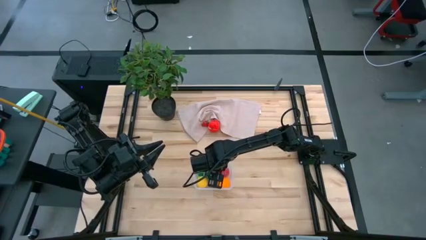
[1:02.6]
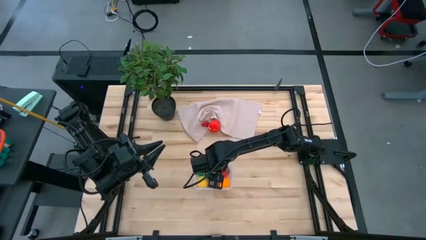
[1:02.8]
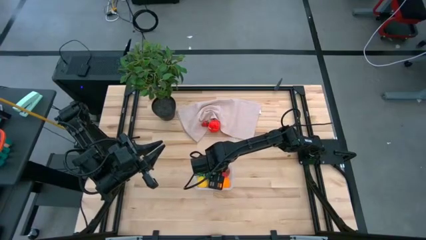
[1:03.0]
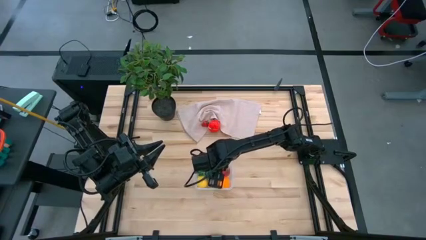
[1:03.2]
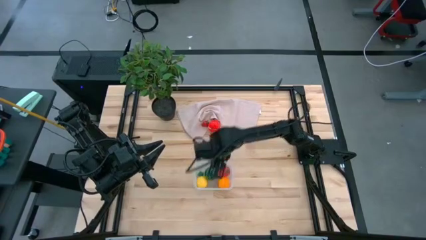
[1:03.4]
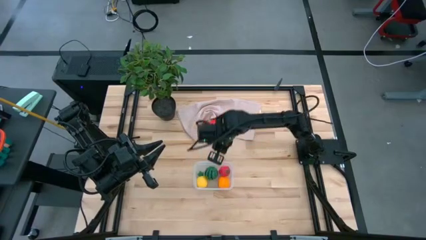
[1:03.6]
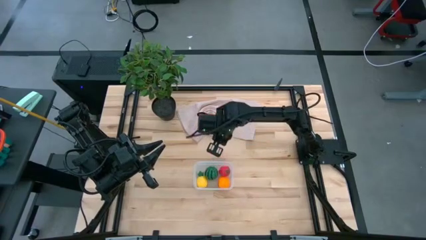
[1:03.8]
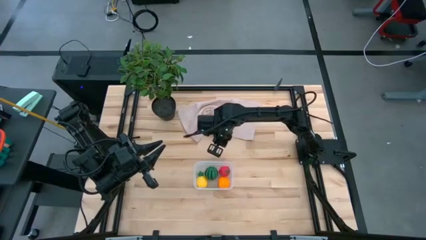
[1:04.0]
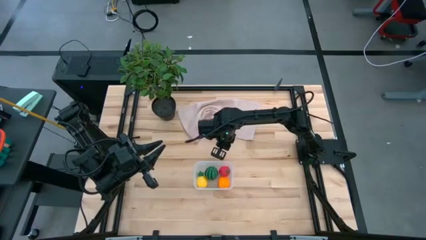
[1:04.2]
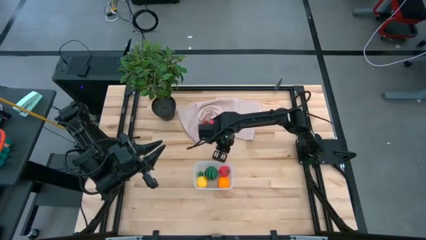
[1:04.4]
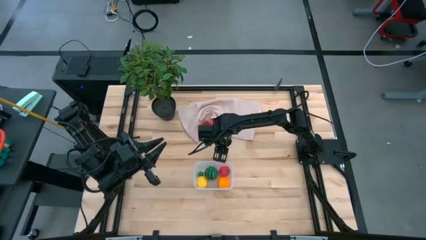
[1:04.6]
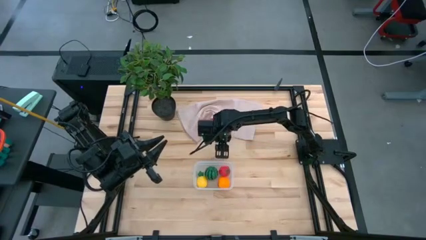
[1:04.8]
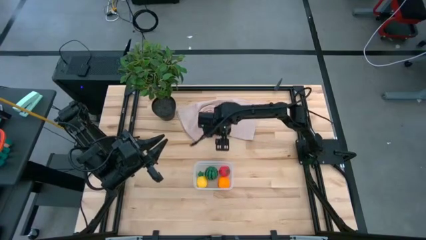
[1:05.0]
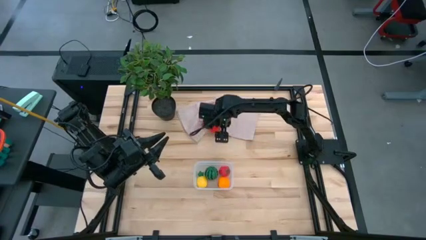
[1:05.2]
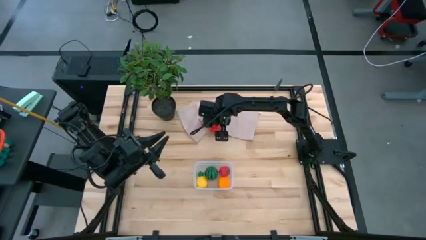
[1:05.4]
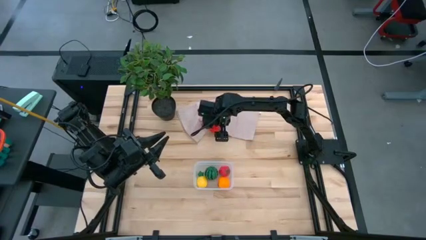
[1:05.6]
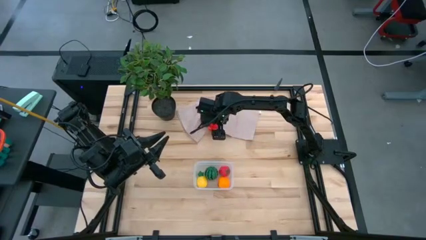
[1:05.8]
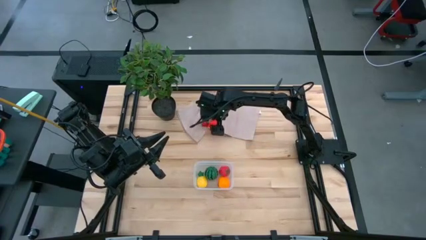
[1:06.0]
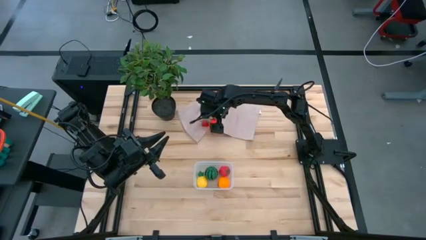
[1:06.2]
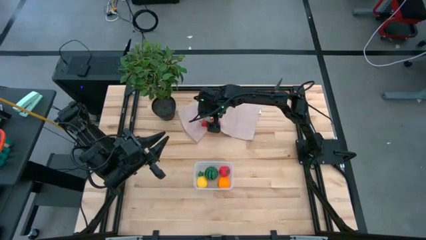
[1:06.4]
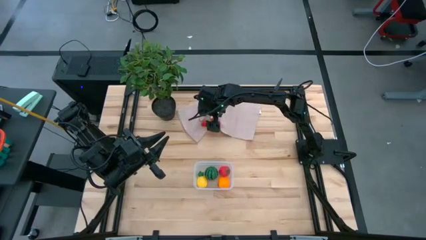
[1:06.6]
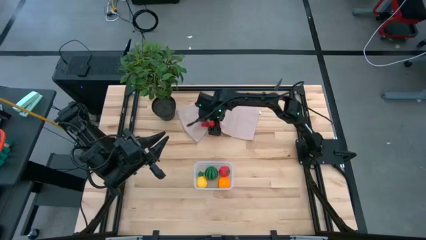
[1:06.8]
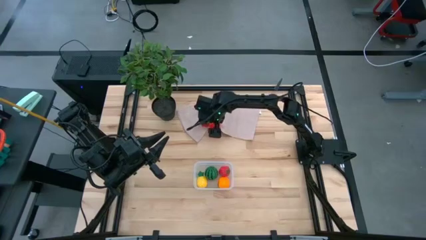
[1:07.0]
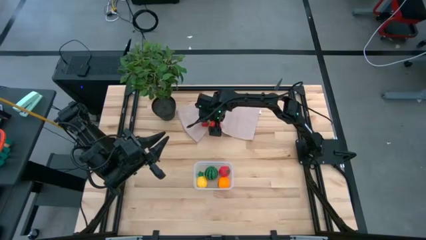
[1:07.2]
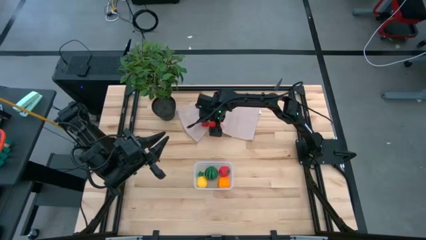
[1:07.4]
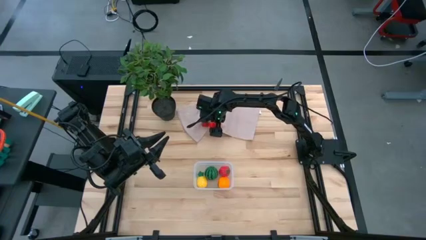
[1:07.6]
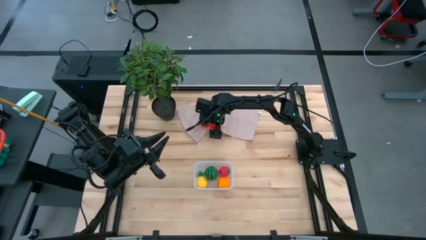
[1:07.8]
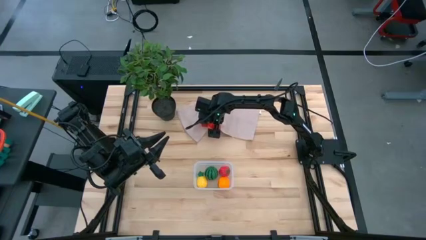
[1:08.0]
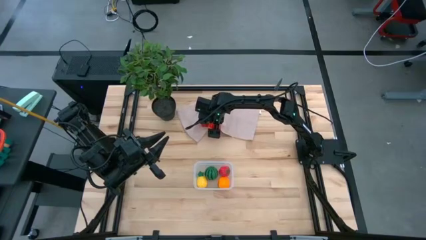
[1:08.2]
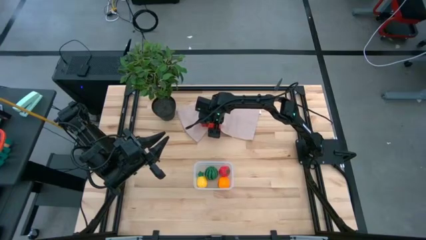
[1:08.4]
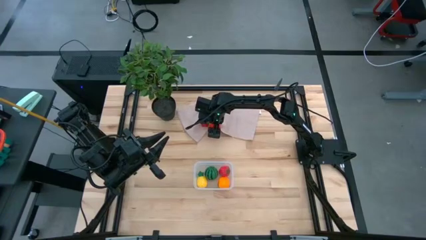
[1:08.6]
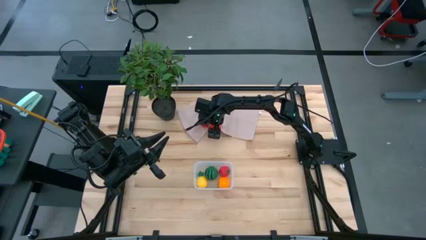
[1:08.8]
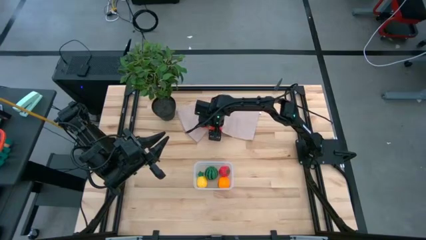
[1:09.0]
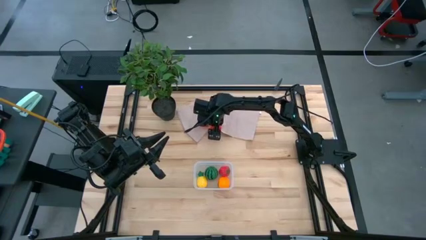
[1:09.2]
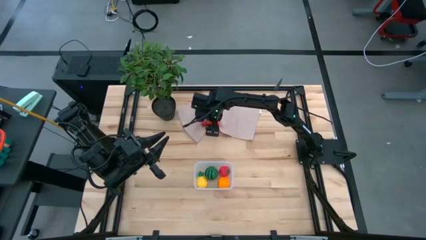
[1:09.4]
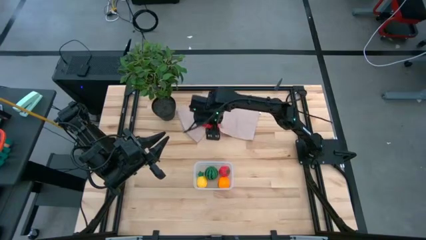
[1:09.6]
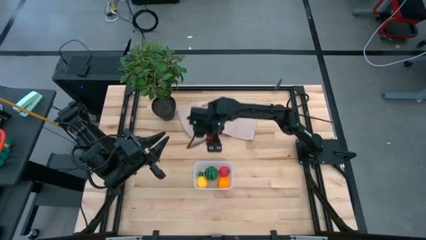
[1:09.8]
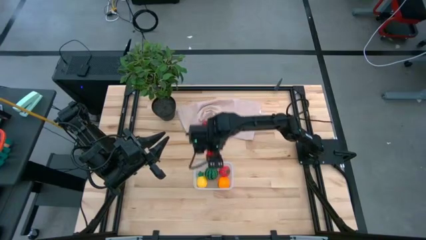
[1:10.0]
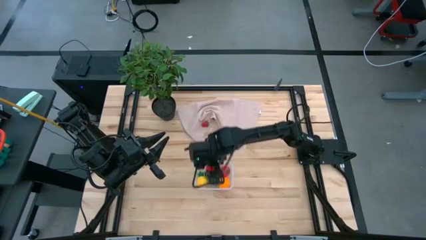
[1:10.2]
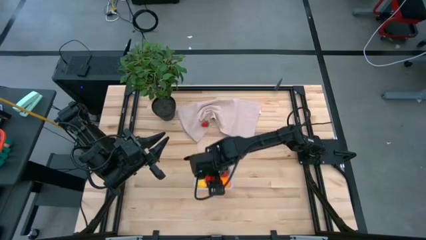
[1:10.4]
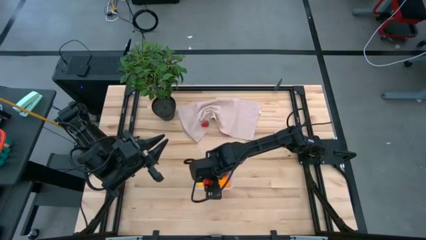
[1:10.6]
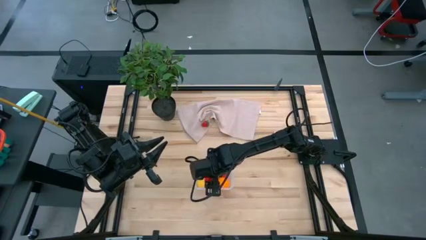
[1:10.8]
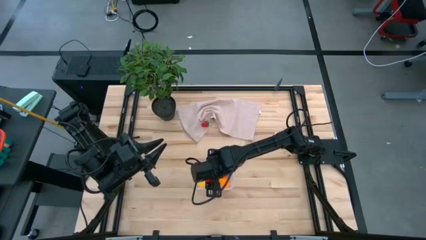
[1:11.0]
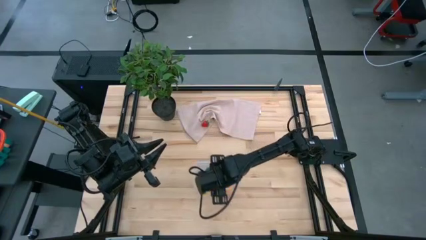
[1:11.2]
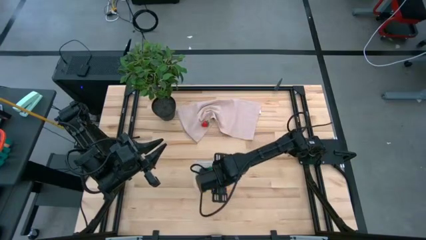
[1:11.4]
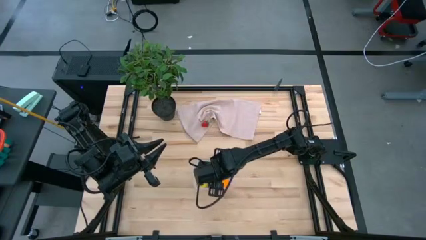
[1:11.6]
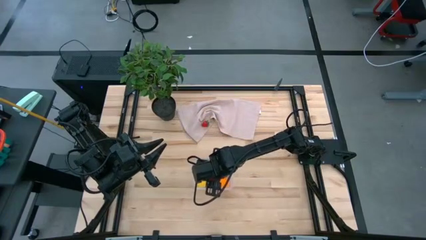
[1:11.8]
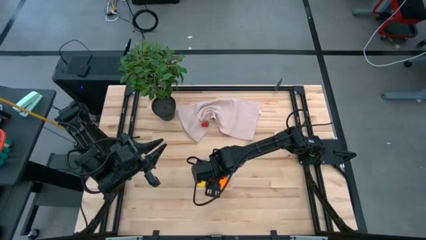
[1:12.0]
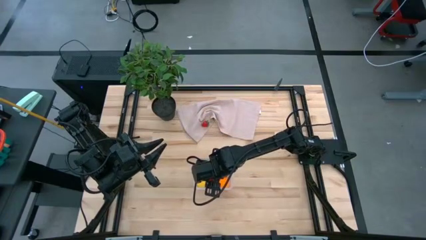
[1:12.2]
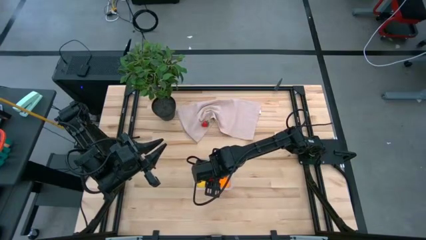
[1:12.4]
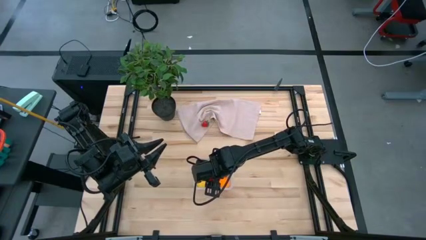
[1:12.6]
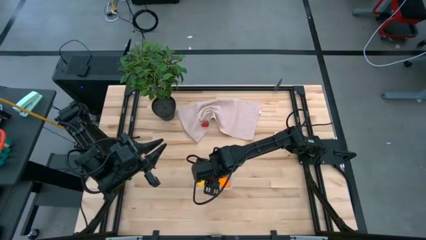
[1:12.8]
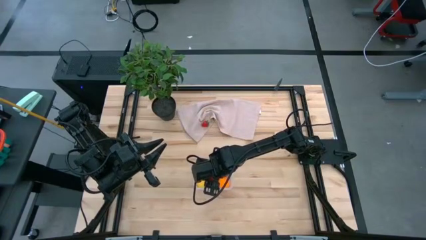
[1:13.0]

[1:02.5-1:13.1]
Task: Pick and placing Produce into tupperware
Put the apple into the transparent bin
